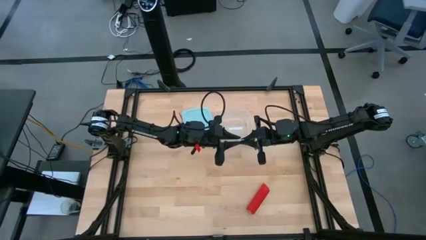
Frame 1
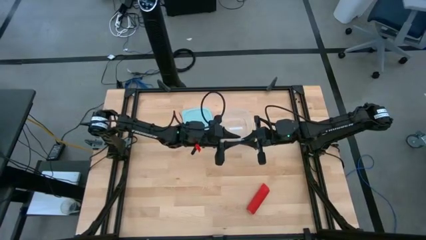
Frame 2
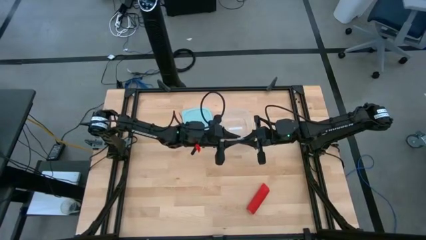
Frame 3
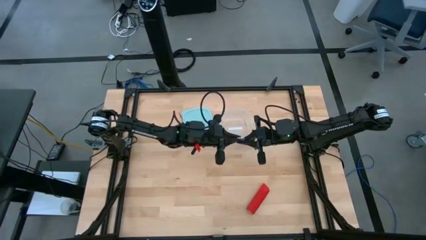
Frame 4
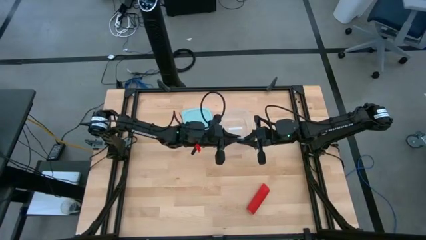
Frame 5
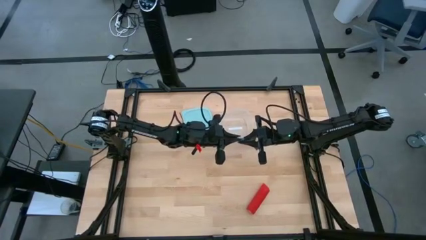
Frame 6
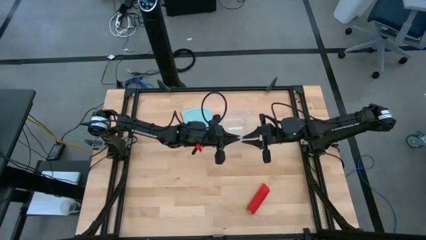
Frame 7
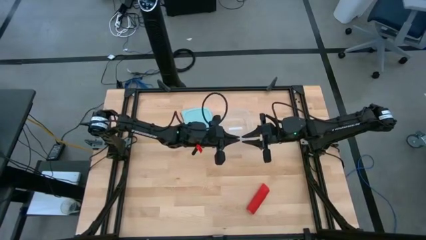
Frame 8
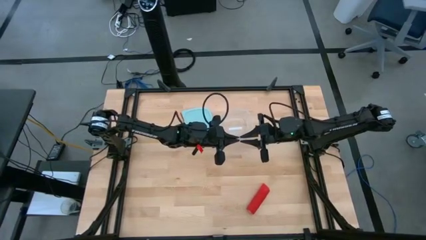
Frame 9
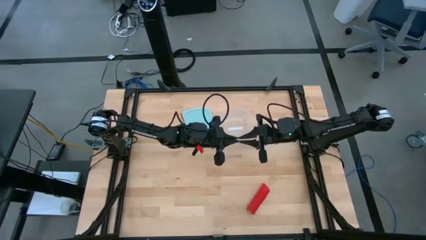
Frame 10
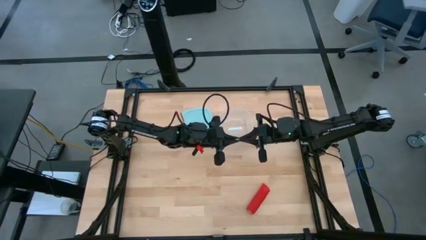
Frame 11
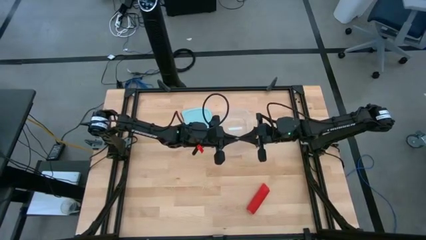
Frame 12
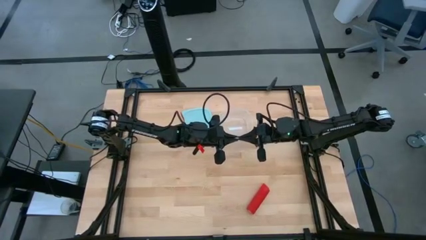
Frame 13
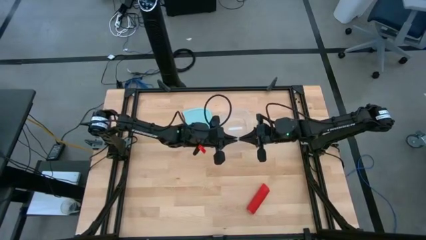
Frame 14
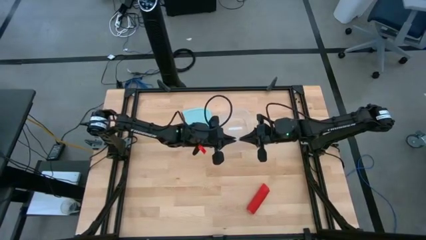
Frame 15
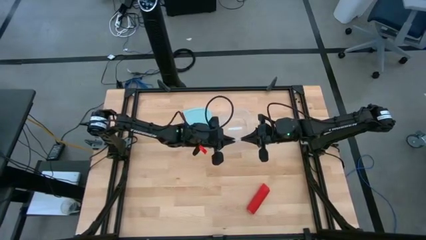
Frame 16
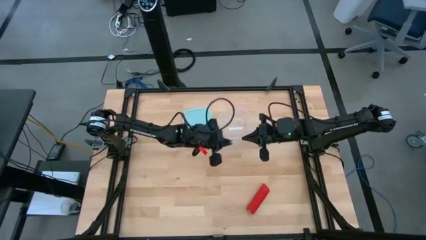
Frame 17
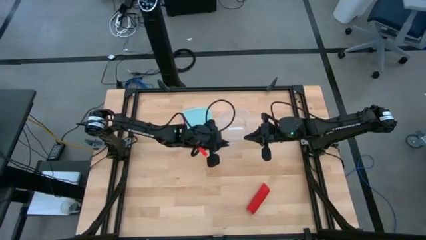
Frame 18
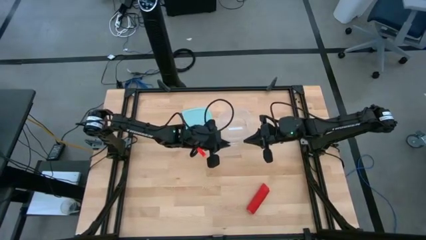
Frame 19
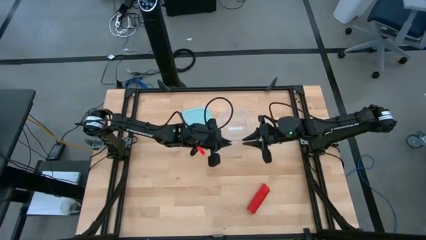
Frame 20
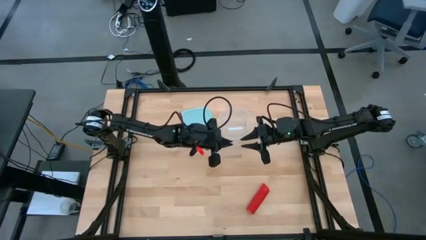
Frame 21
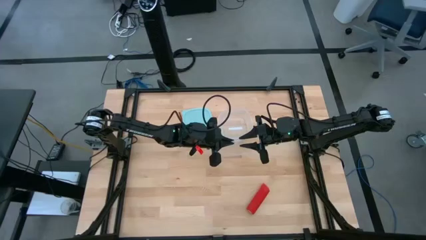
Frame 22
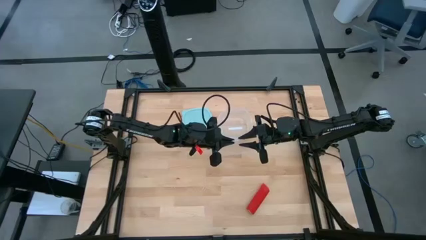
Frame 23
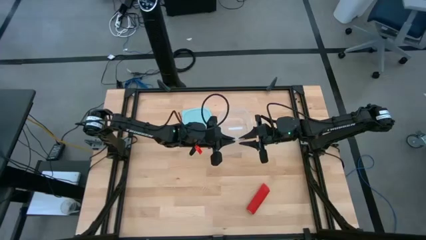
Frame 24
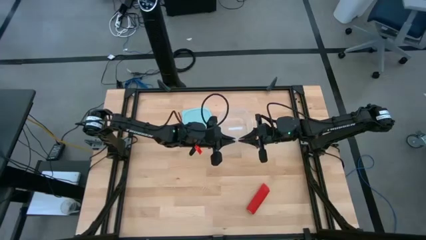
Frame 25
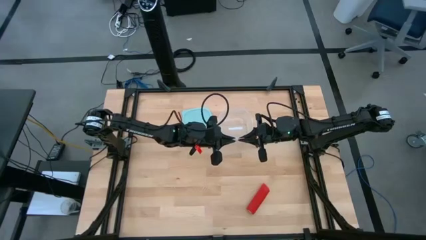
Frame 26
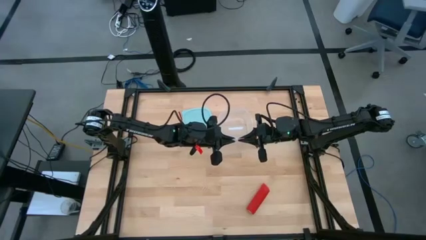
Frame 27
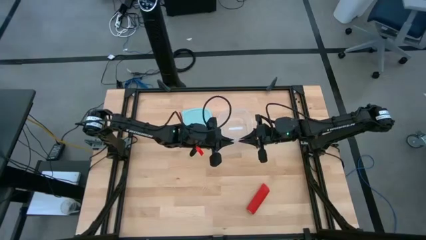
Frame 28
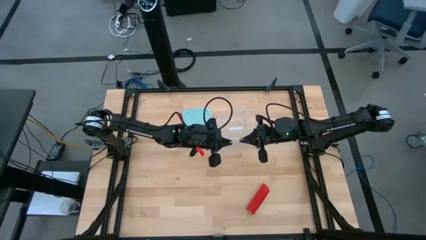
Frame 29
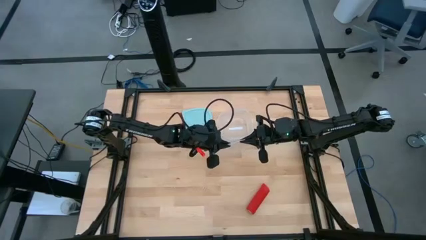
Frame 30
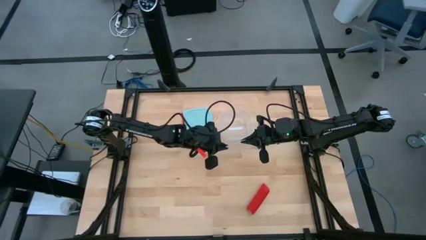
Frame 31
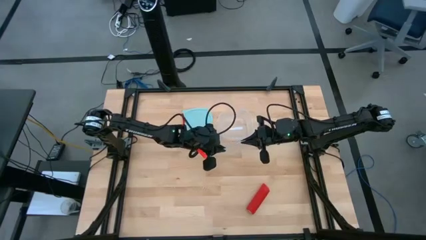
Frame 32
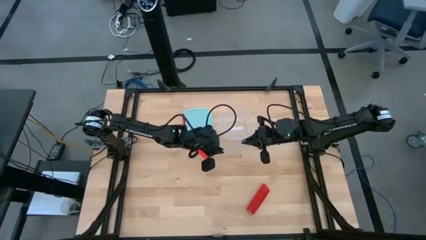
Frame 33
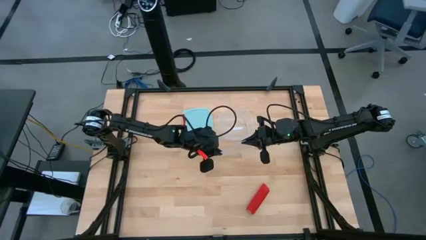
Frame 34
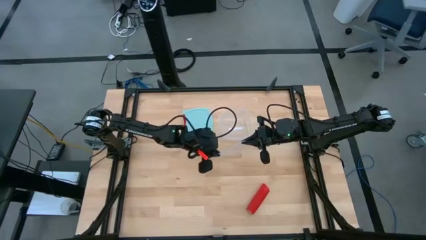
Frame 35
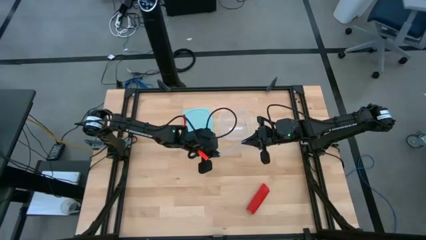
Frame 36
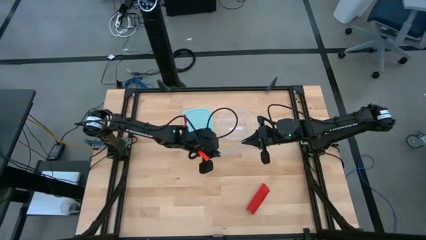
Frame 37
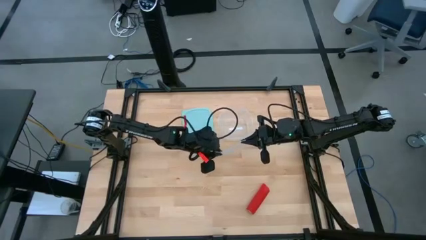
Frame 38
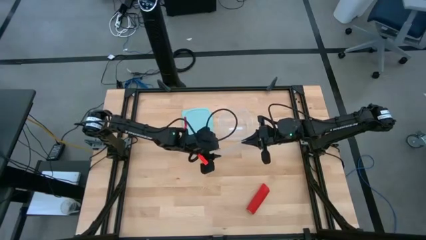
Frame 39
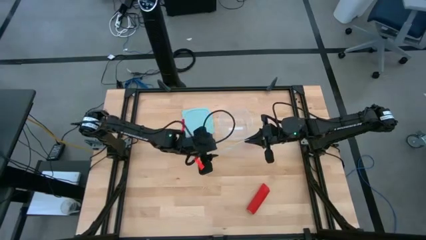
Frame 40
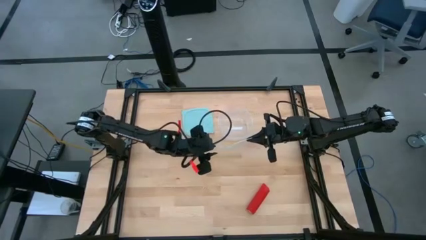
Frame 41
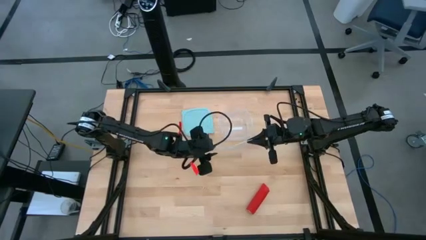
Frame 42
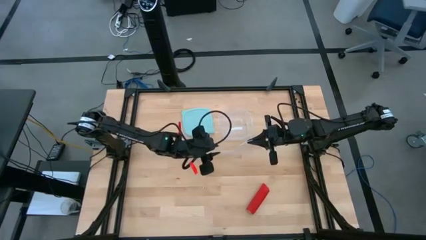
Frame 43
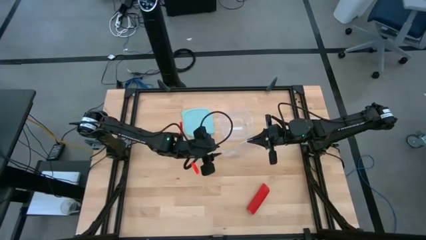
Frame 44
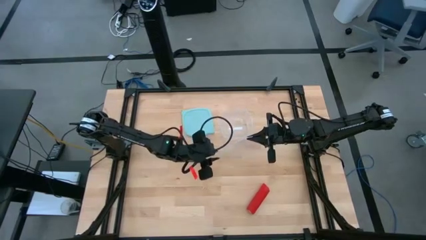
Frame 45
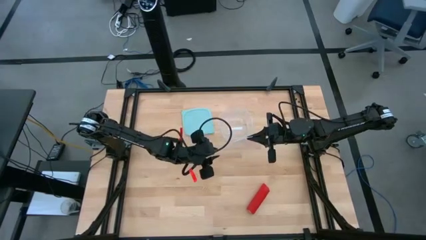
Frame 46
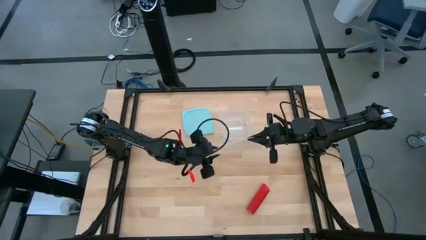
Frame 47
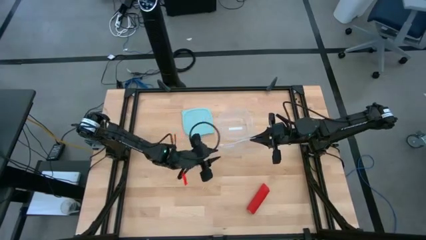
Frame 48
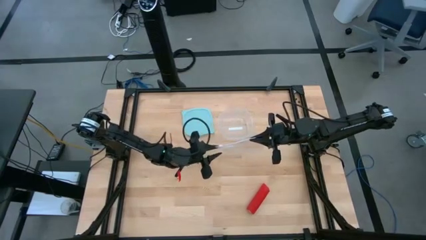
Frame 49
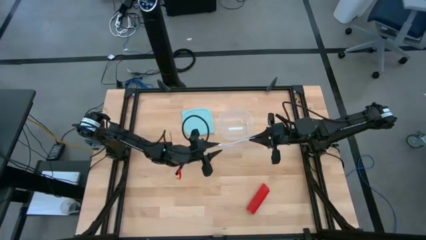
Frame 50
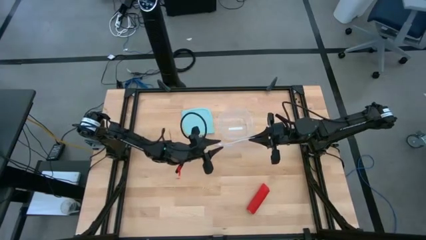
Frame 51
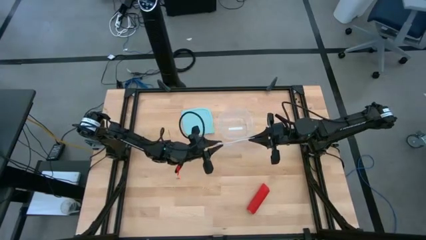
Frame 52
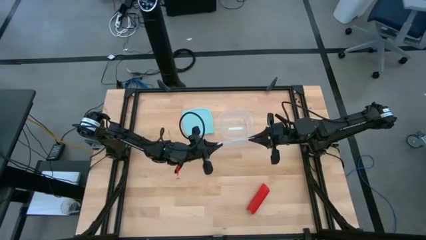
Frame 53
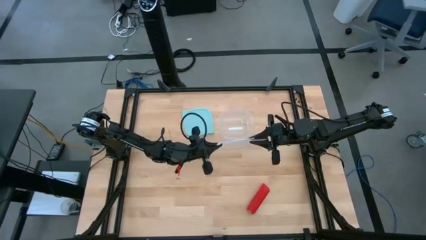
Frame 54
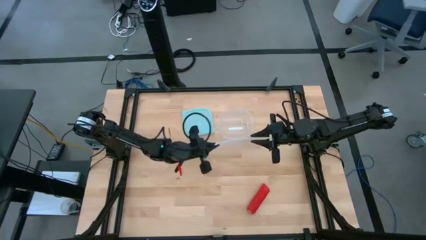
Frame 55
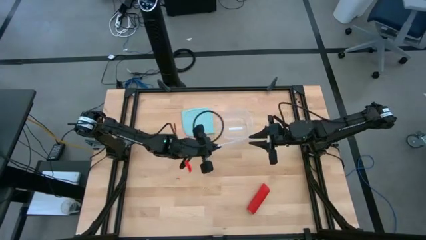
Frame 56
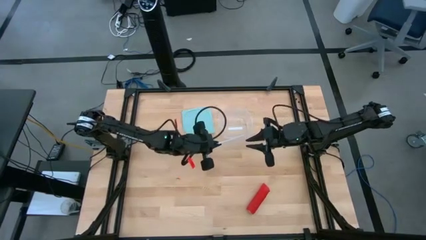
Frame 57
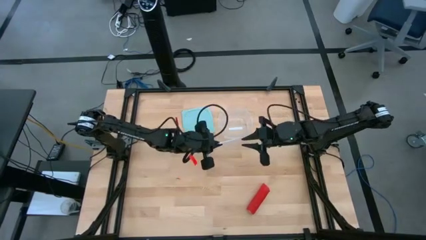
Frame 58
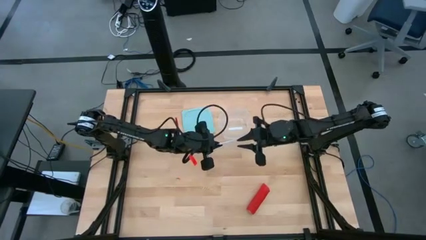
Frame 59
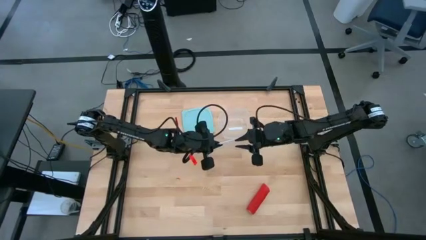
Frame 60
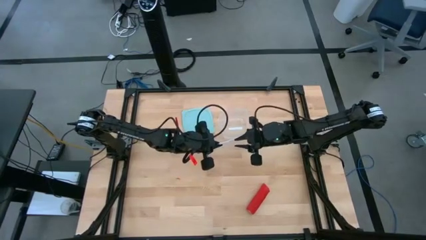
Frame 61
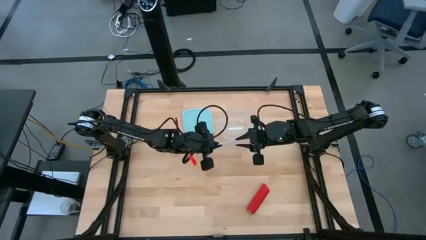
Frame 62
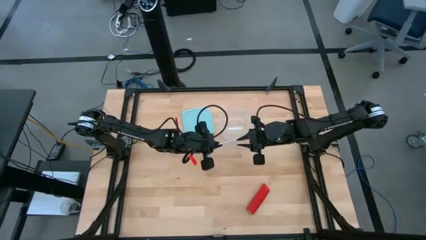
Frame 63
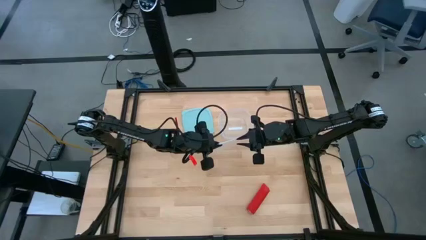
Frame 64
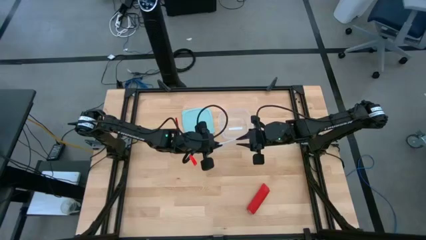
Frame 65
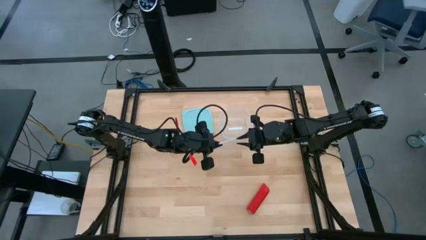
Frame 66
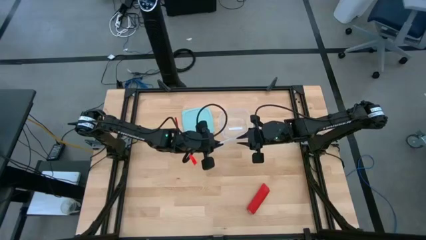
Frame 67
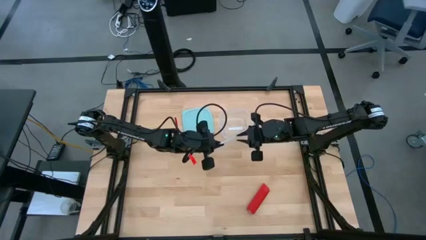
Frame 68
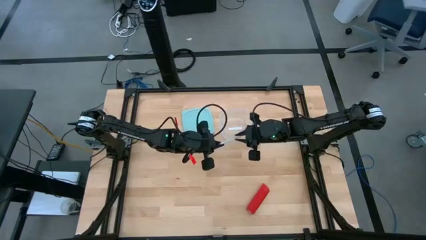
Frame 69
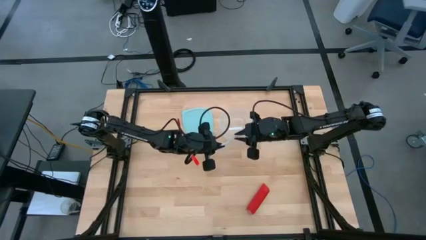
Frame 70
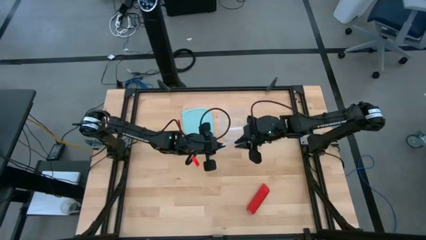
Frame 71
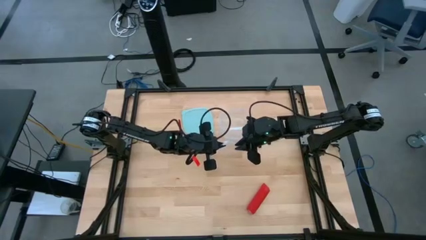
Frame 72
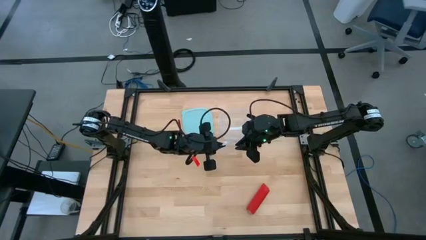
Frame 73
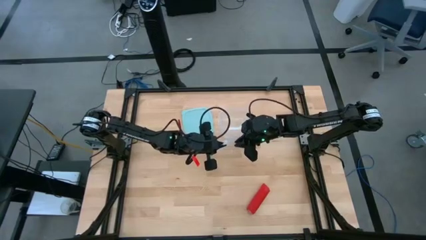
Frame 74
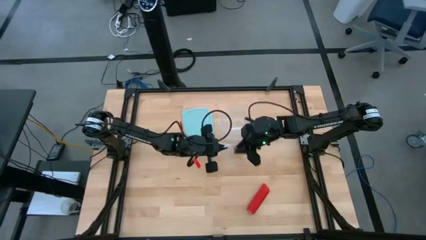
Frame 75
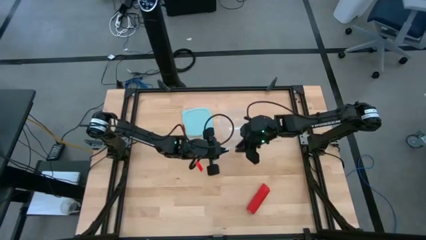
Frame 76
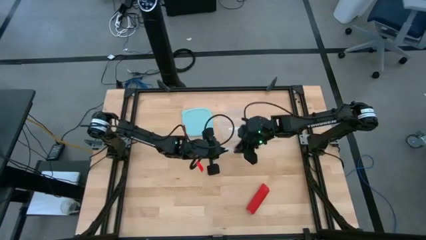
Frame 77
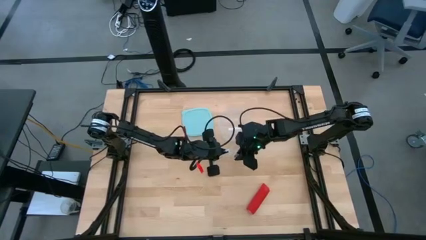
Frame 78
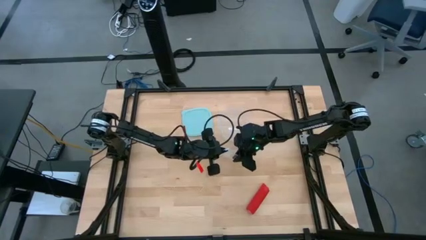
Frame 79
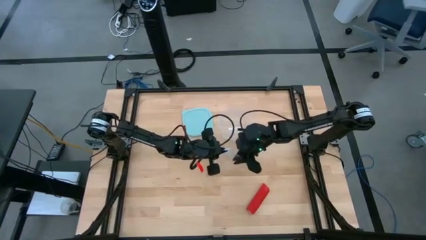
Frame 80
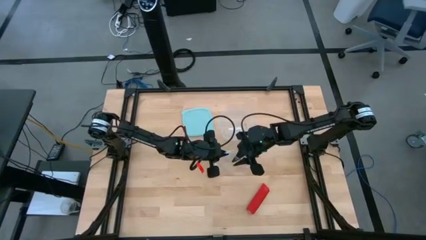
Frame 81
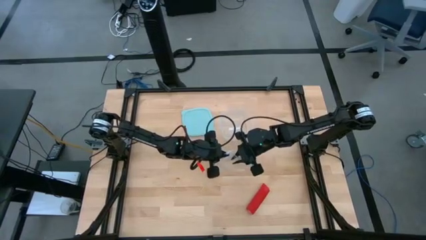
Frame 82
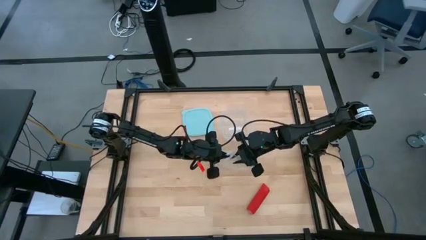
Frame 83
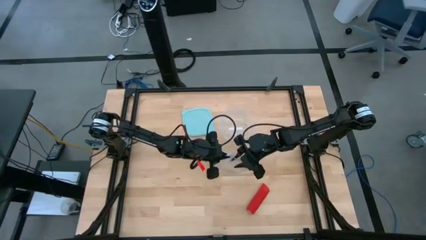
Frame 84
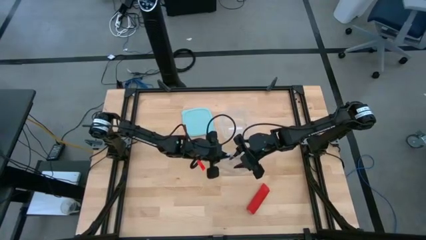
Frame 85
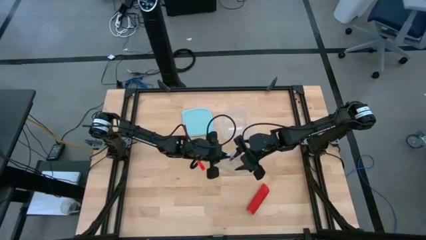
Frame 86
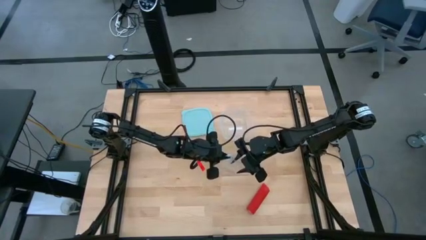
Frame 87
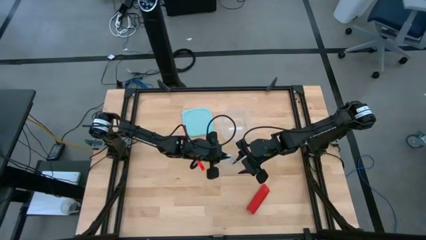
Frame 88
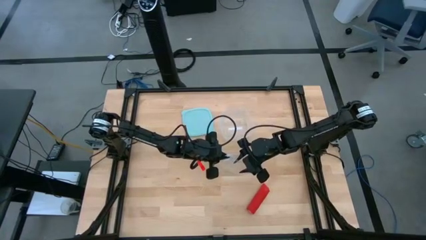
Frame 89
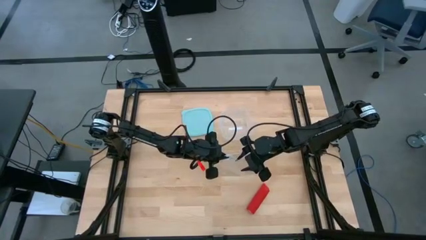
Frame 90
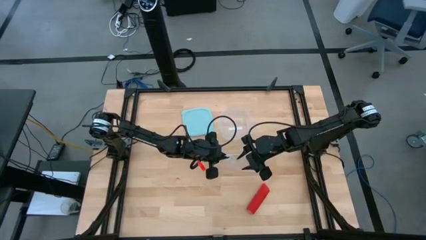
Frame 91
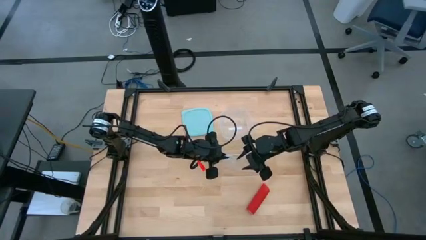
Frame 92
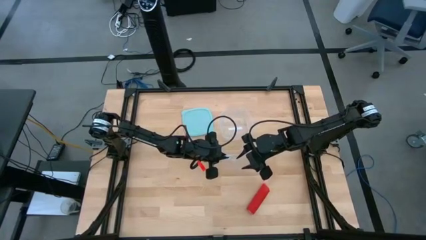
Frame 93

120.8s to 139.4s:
Task: Roll bandage
Open the transparent zip lock bag
